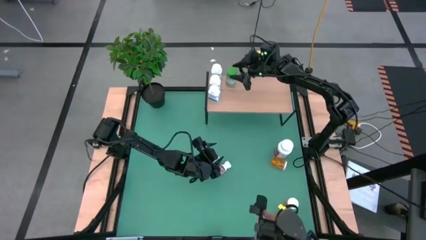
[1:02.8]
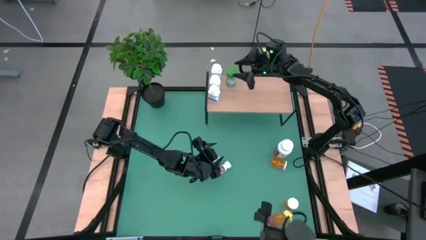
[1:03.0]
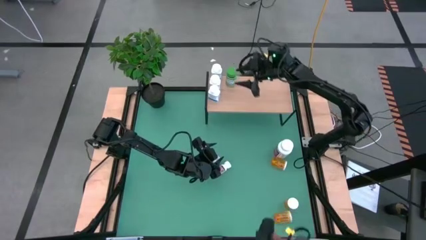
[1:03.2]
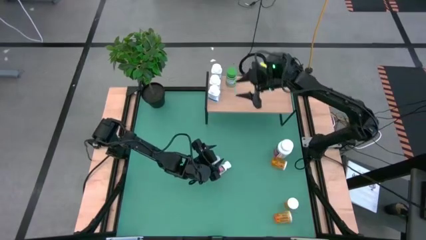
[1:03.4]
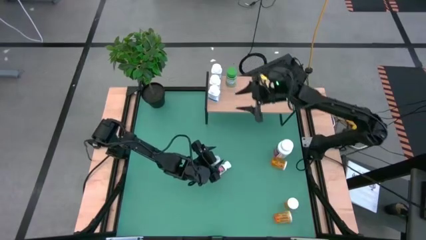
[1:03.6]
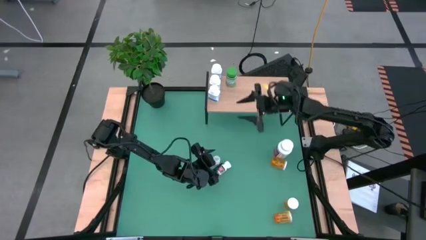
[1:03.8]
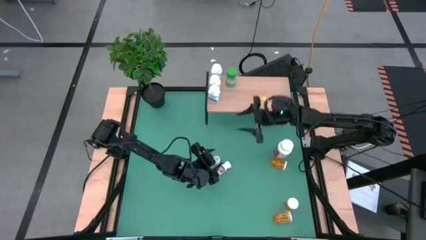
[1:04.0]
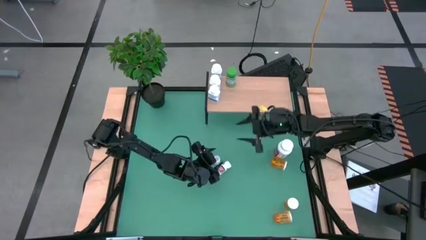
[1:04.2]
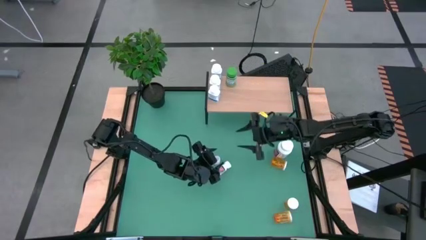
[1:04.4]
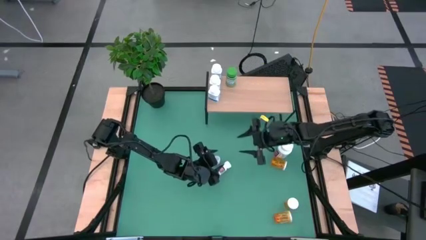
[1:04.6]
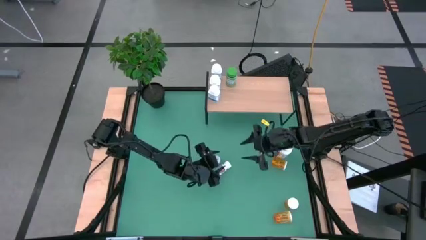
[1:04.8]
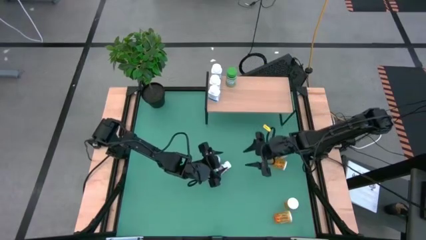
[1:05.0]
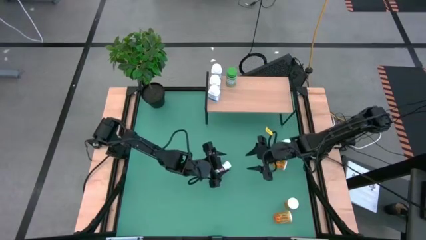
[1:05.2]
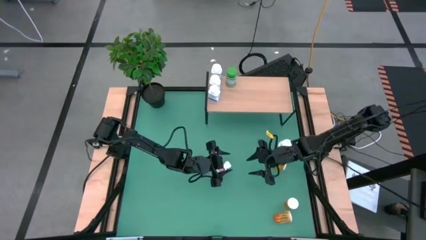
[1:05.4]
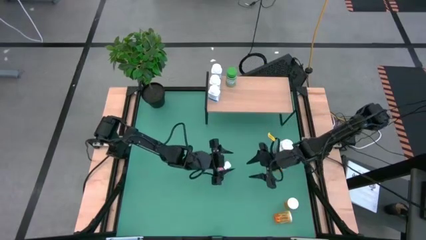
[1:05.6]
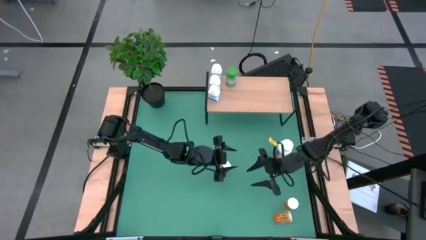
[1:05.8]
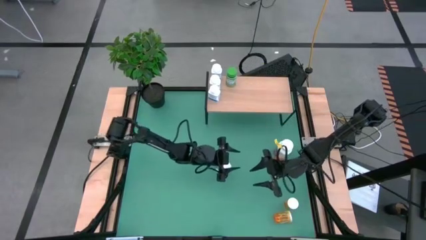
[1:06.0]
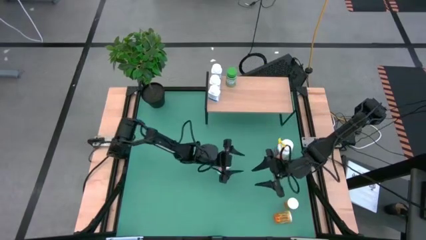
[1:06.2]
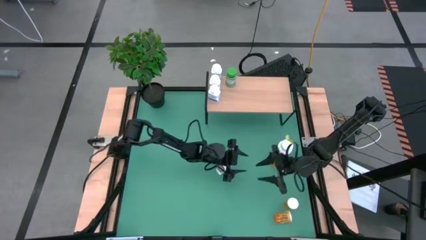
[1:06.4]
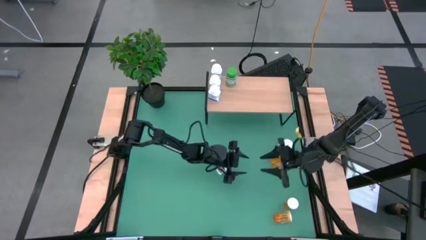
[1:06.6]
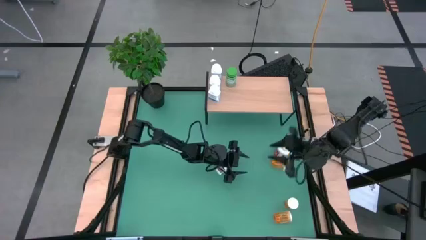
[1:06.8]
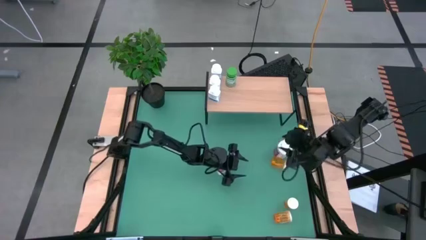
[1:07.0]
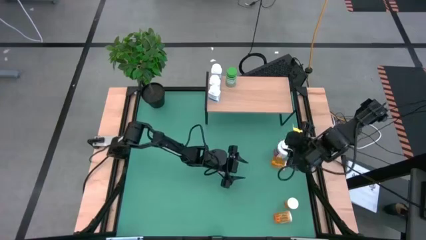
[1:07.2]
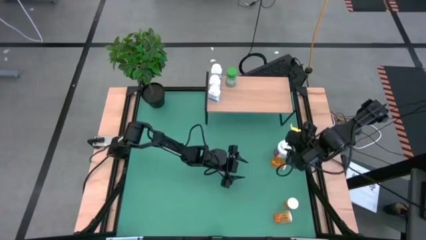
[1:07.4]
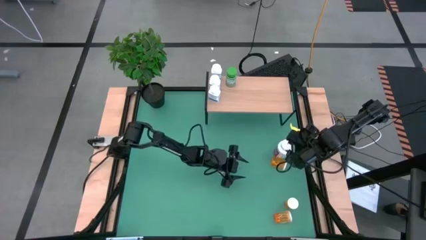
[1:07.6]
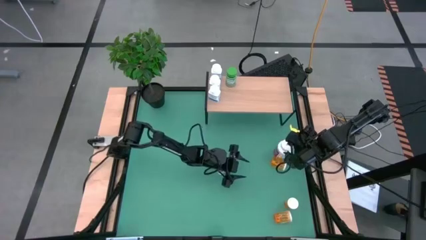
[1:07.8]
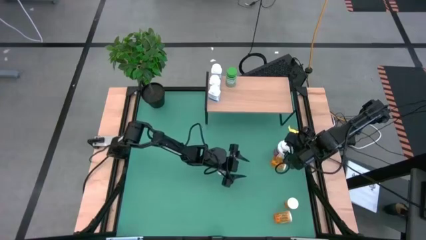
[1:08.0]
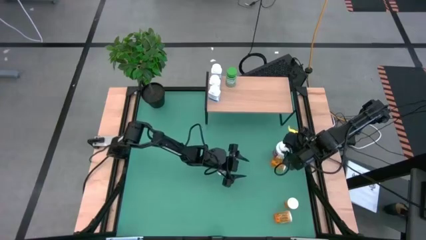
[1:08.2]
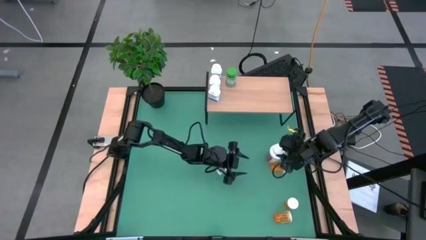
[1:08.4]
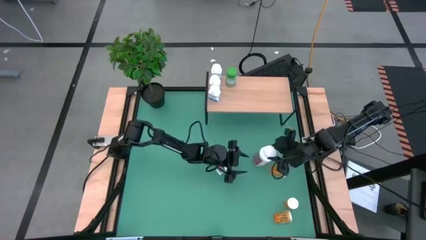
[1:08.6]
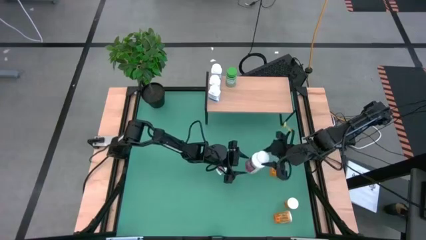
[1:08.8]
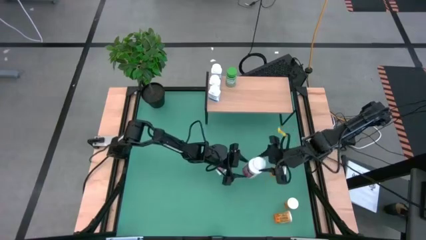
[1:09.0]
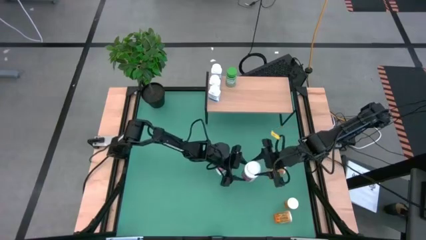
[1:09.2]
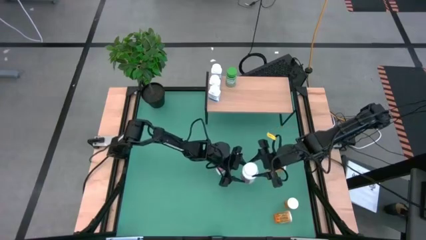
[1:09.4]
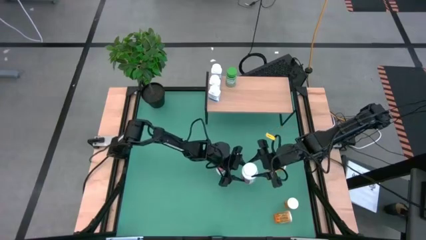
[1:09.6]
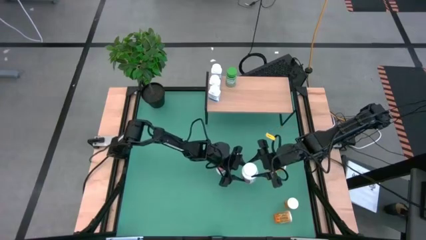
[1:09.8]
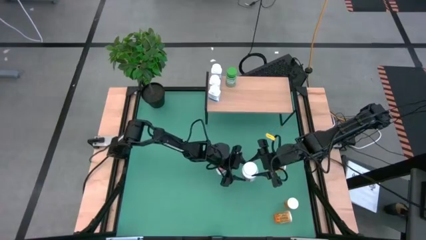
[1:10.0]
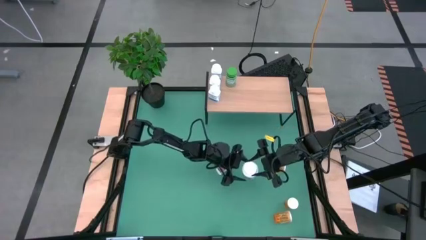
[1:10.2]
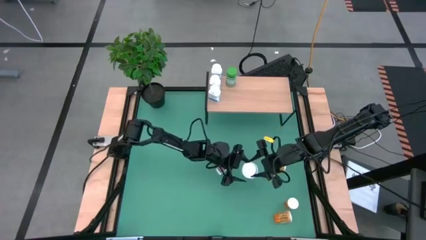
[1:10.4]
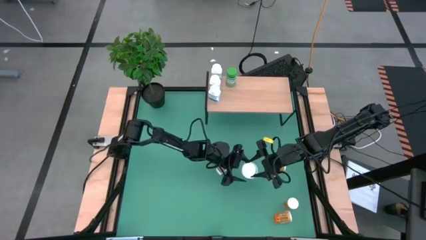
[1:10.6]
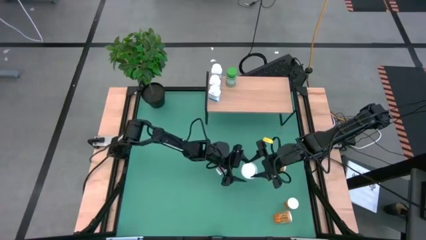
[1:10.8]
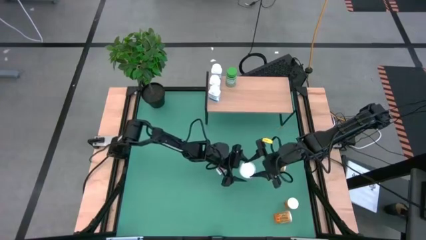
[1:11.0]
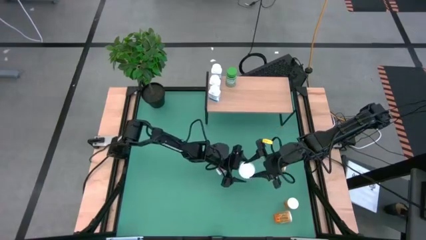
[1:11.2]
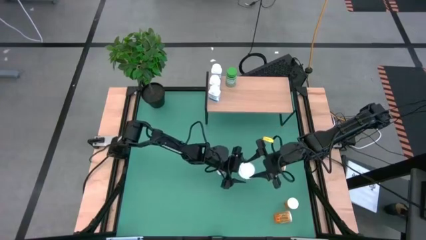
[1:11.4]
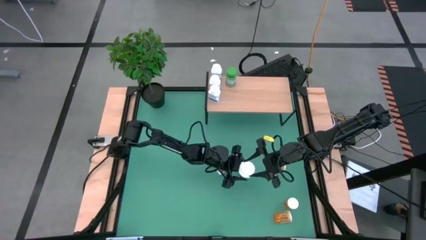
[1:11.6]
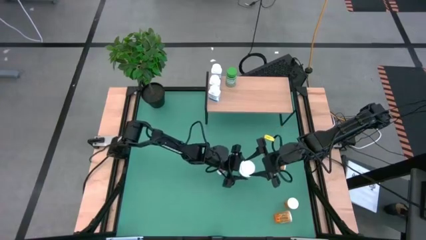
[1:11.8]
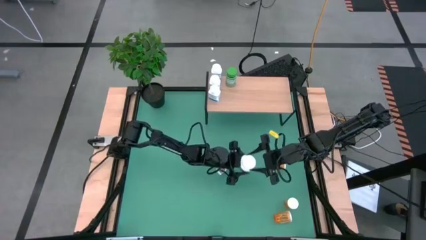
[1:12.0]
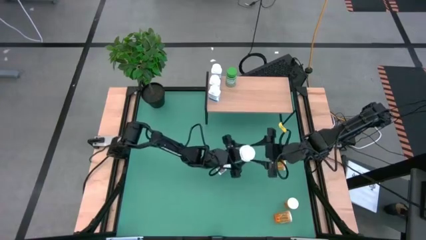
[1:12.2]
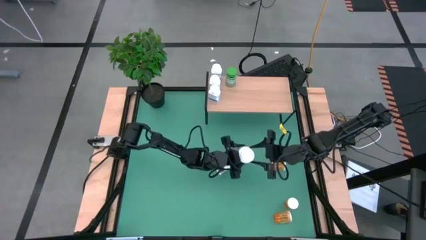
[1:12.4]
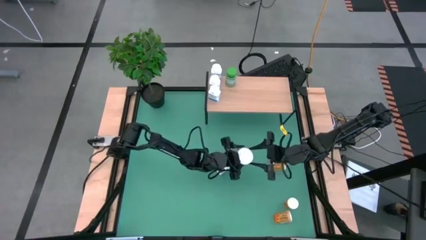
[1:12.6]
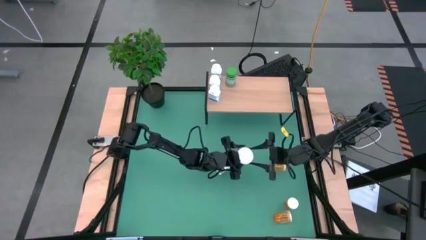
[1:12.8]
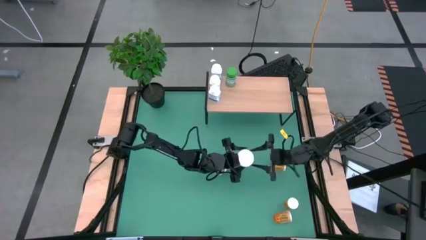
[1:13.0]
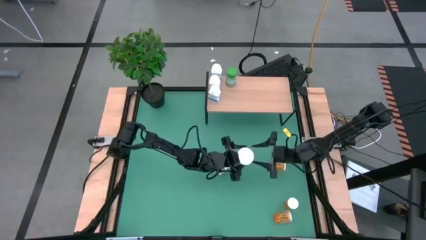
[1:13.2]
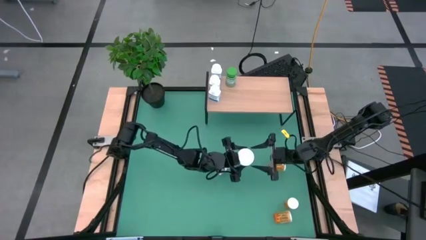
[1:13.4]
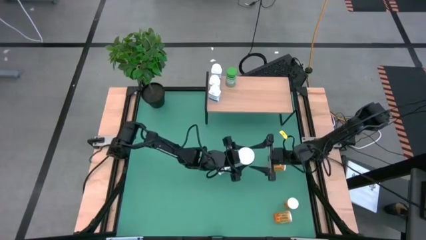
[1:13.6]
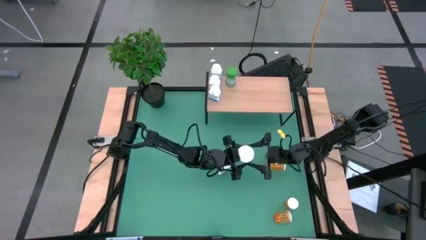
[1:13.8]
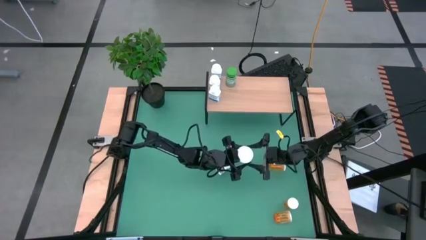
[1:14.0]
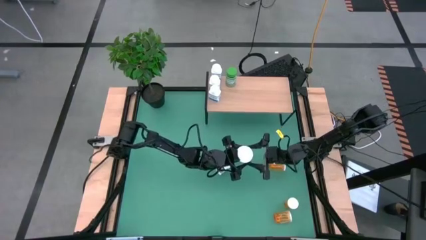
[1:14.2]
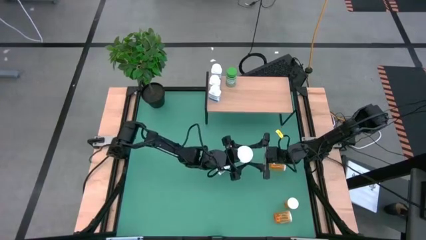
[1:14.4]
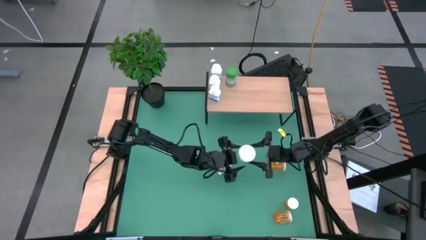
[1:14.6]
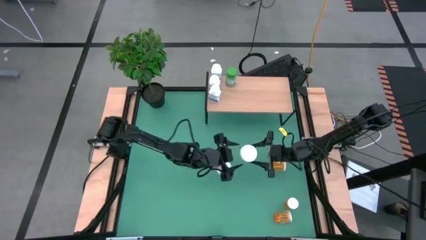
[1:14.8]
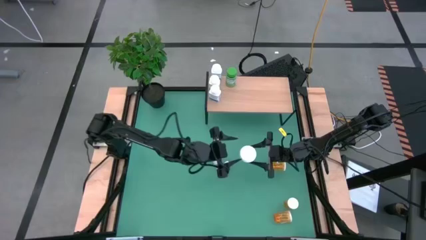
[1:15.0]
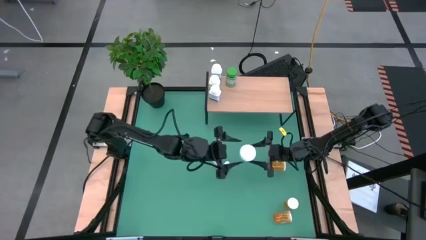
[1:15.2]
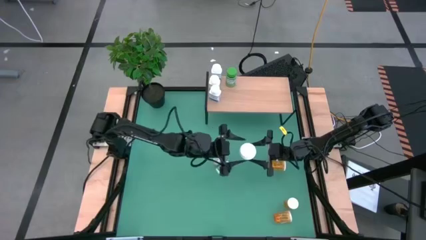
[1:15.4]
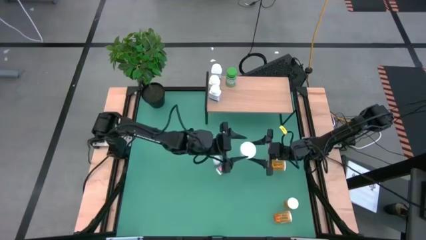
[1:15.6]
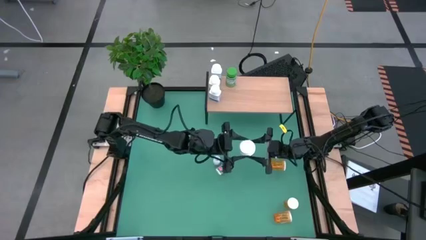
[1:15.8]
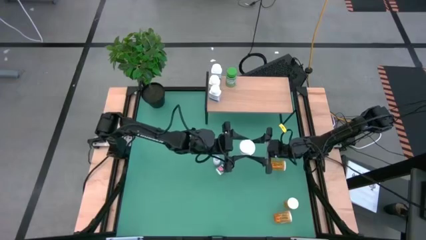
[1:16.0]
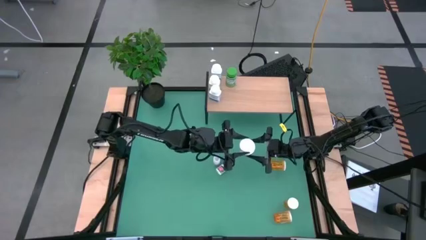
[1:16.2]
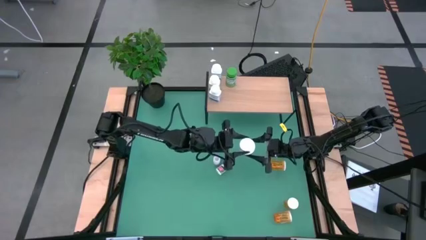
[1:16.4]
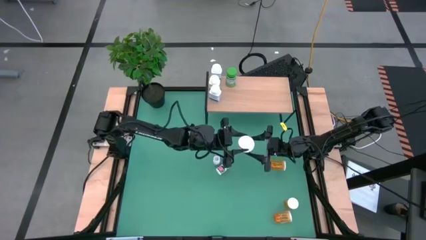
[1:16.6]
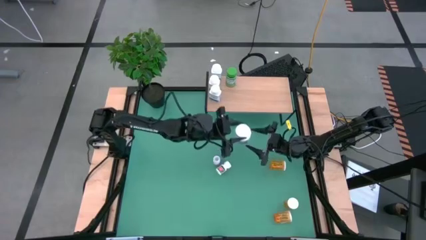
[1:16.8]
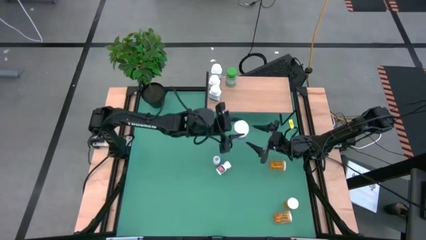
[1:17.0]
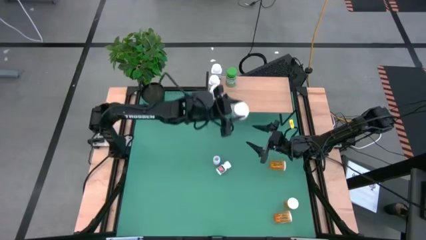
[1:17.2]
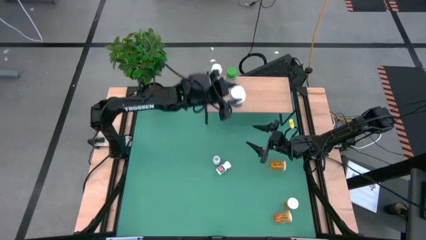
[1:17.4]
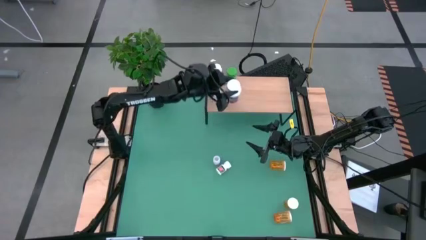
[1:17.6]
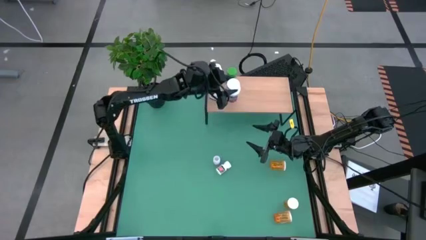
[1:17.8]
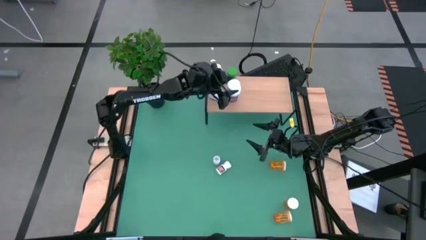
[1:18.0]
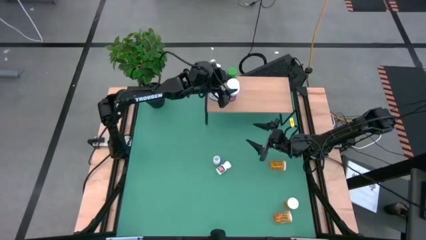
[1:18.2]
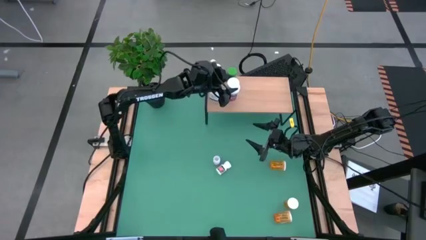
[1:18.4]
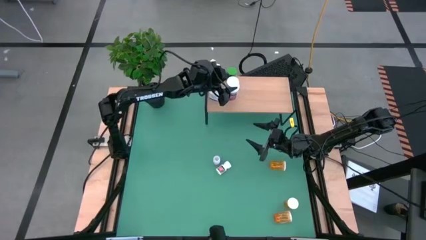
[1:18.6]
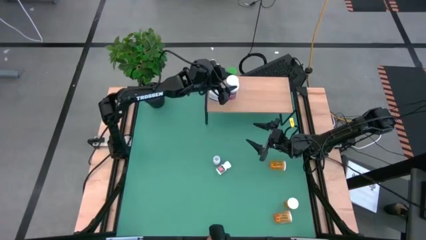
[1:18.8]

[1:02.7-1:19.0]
Task: Pick and place medicine bottles onto shelf by color
Put the white and violet pill bottle on the shelf
